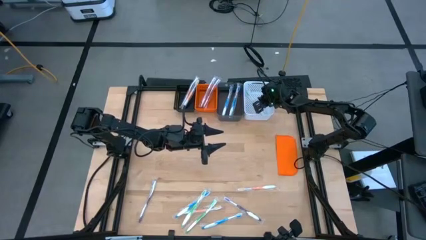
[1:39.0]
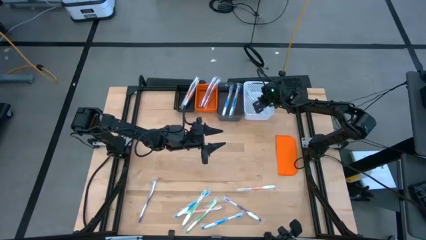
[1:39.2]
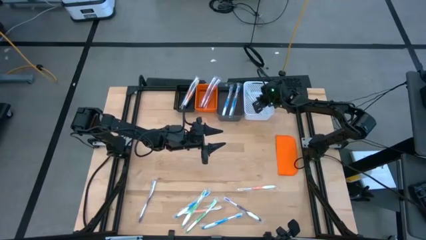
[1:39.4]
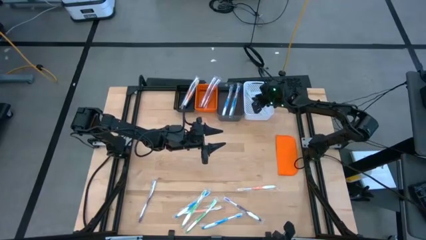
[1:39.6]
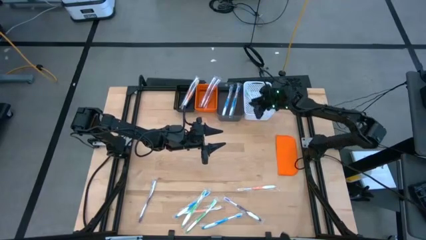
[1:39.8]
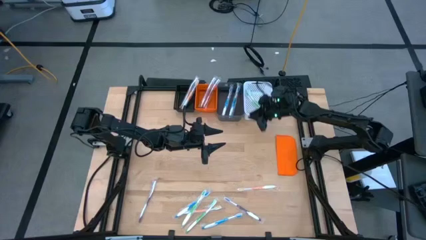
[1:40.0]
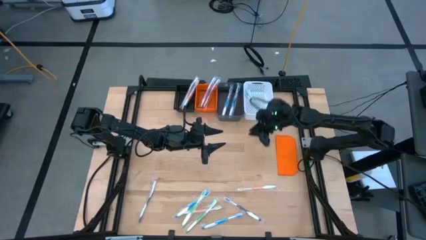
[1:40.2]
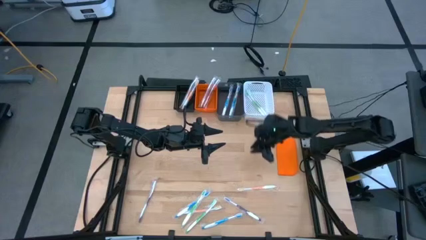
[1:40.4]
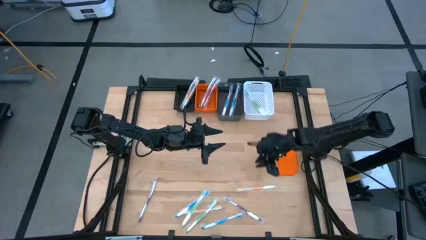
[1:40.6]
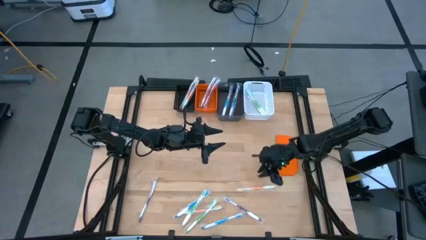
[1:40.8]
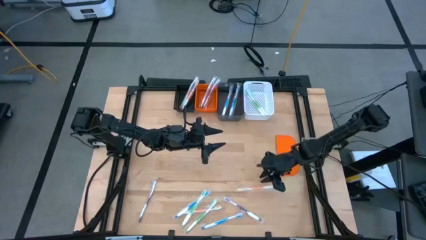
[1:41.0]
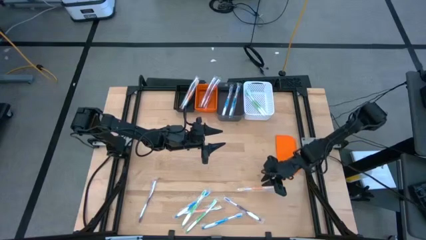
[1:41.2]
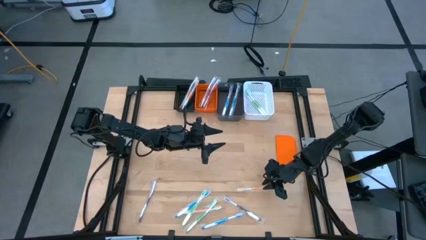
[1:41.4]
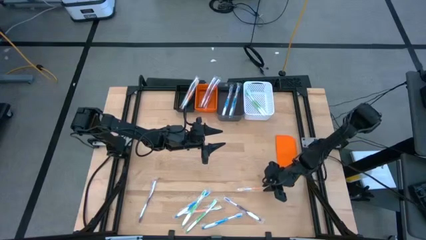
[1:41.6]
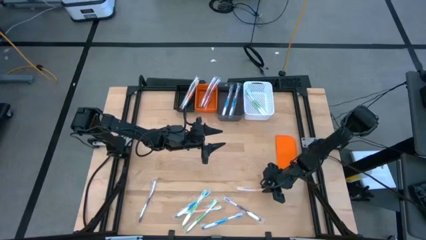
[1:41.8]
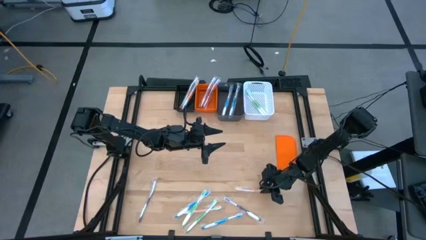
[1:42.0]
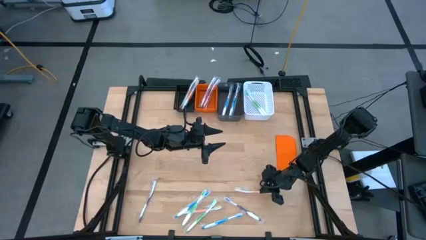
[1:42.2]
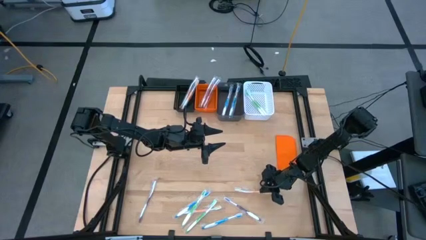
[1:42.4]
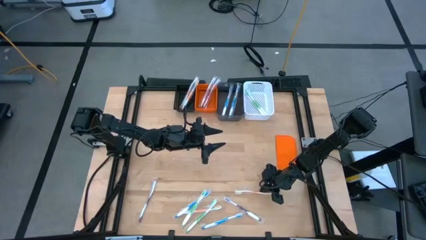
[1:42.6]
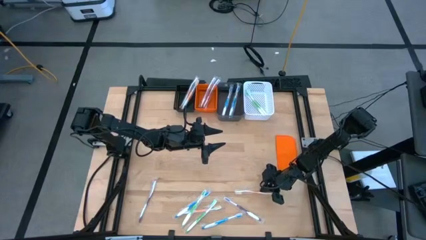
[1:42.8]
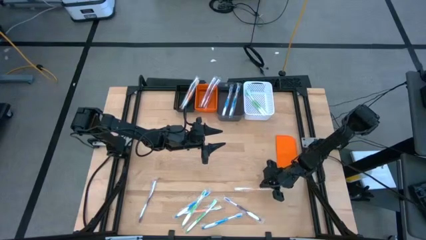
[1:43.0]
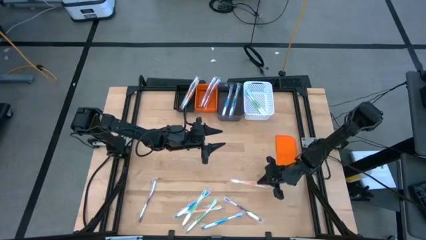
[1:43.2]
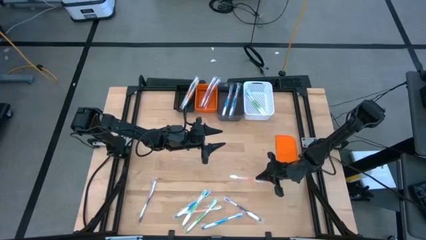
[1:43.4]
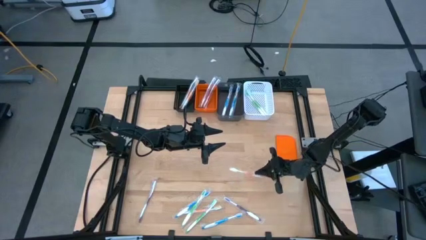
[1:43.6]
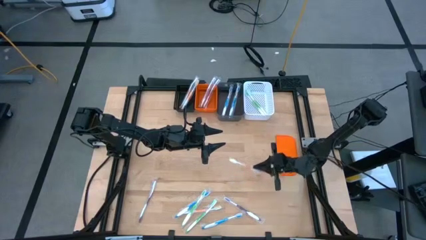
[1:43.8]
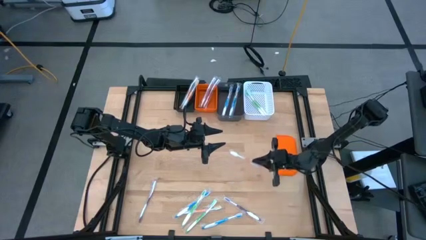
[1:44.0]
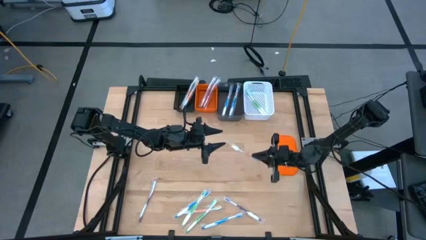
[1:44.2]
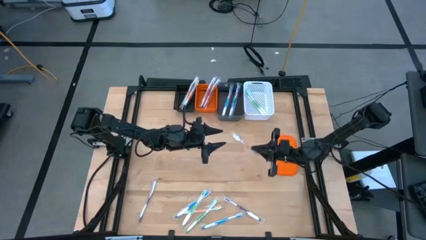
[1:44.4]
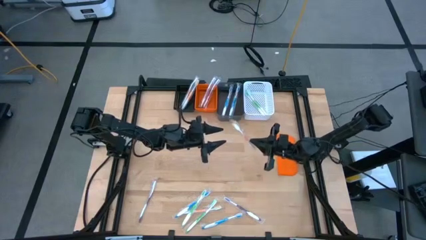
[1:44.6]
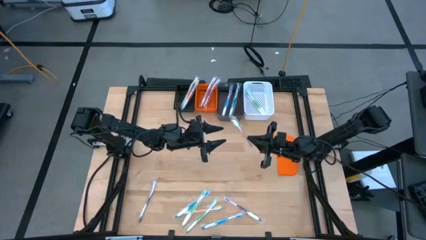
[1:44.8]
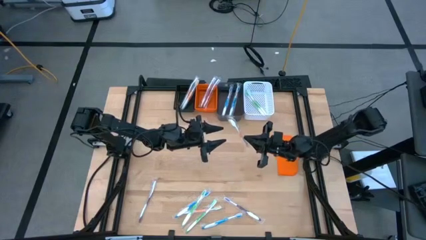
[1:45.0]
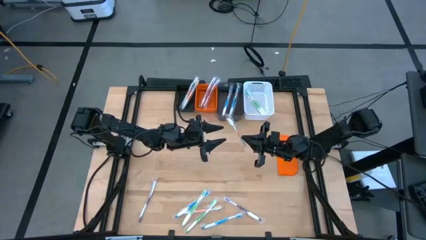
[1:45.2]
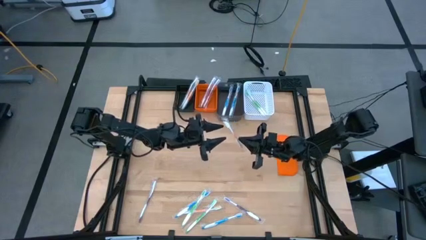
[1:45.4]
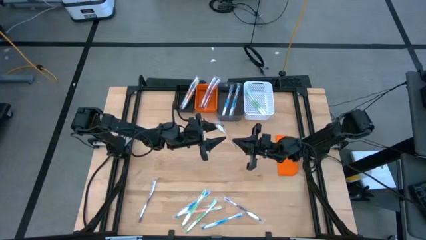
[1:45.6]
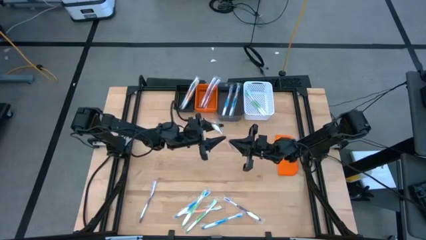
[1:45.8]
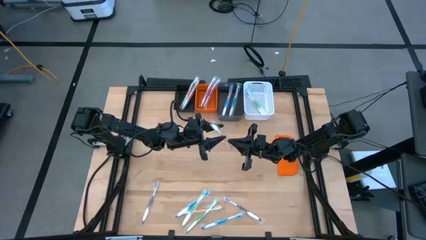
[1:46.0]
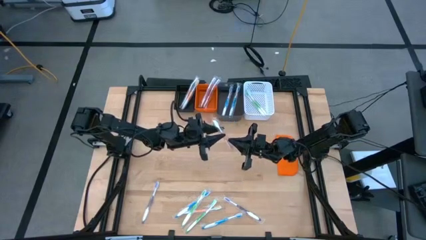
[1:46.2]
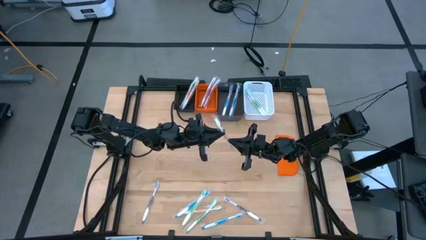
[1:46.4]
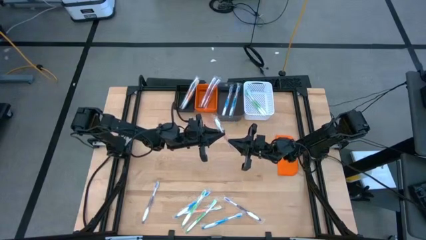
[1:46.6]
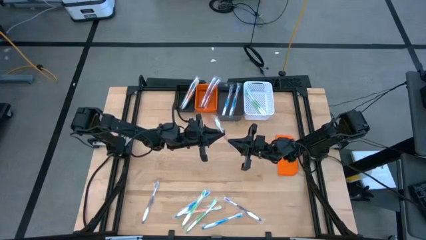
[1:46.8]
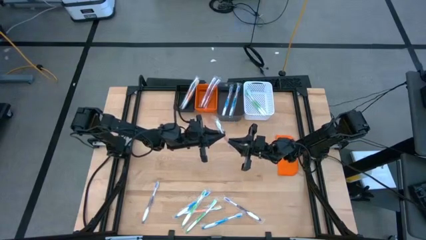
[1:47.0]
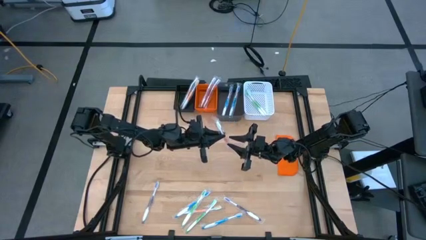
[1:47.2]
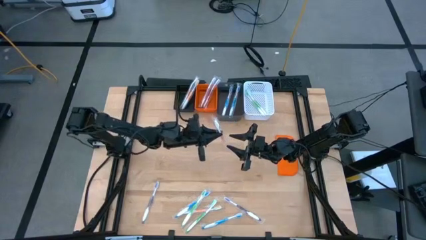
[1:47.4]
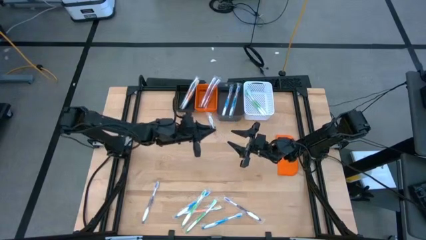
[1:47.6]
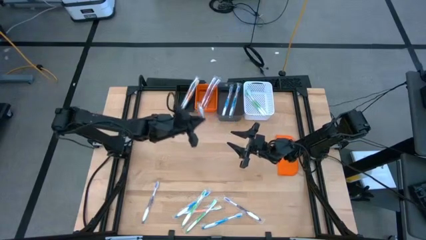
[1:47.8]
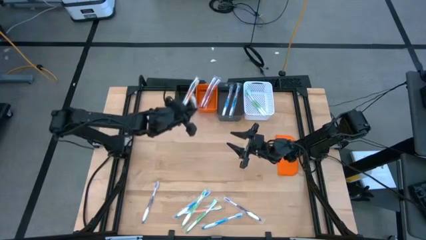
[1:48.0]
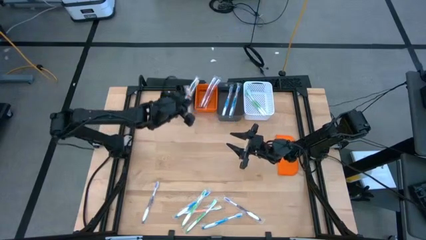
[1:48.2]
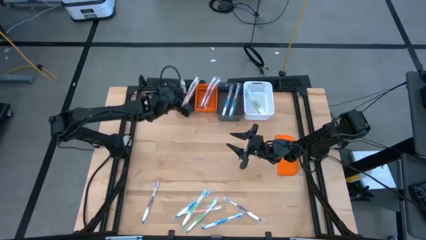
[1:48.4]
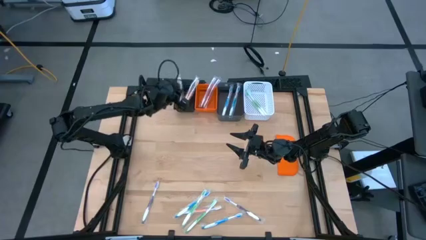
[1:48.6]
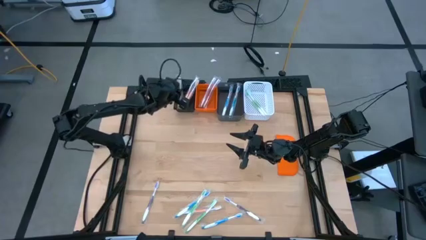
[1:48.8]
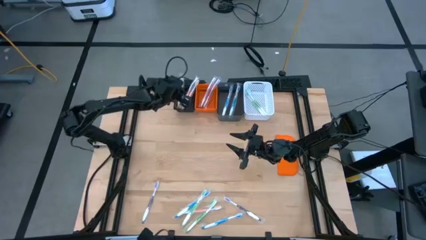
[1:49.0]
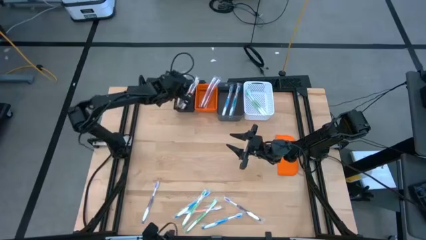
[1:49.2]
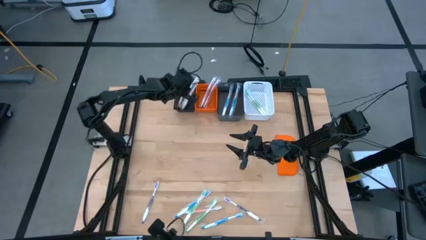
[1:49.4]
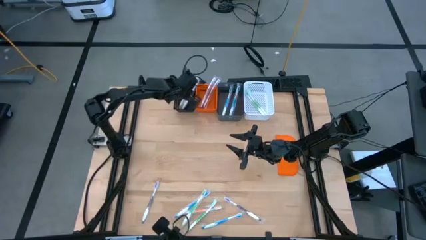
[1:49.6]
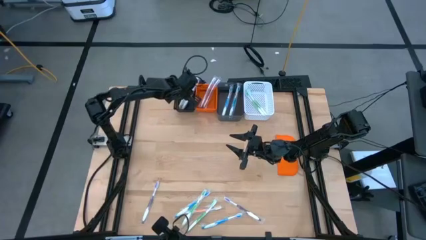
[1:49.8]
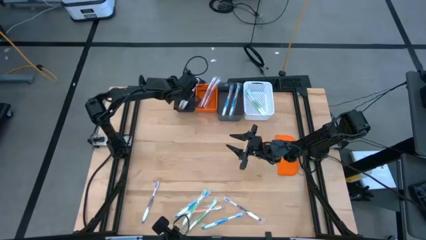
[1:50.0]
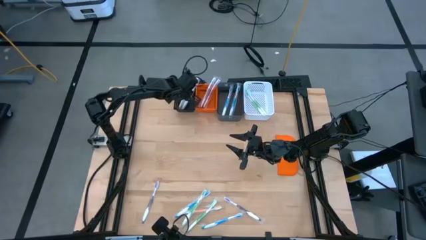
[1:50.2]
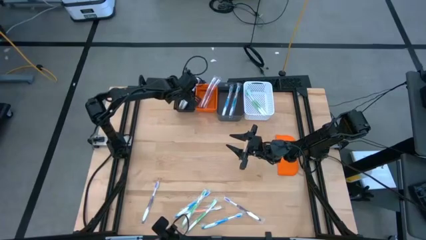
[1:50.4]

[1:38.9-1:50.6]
Task: Pick & Place Toothbrushes
Put the orange toothbrush into the black bin

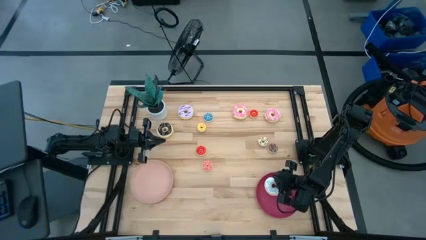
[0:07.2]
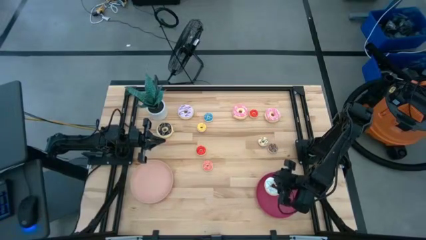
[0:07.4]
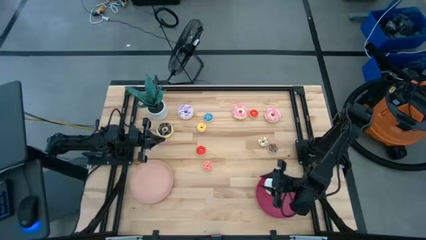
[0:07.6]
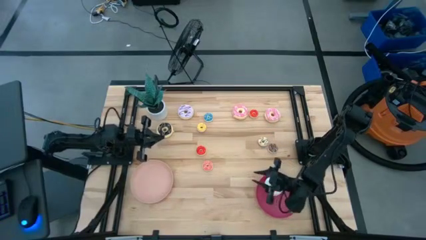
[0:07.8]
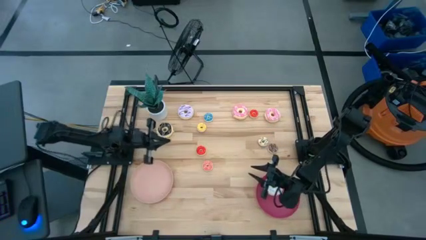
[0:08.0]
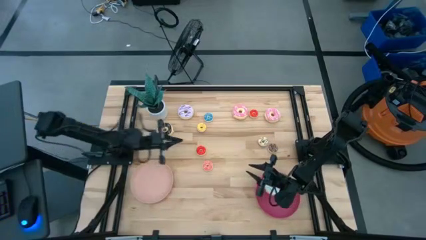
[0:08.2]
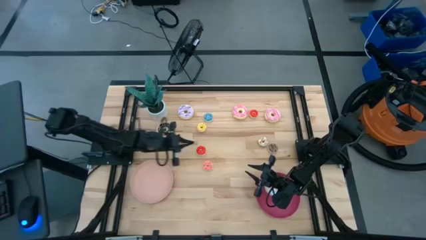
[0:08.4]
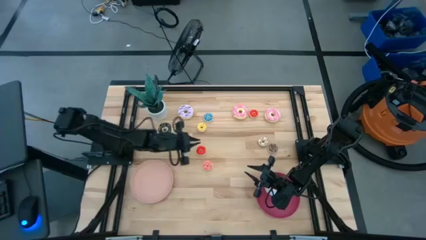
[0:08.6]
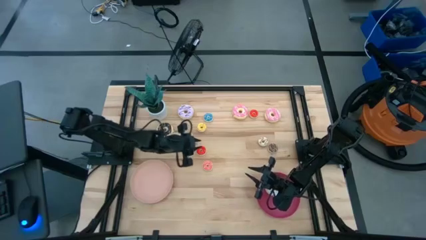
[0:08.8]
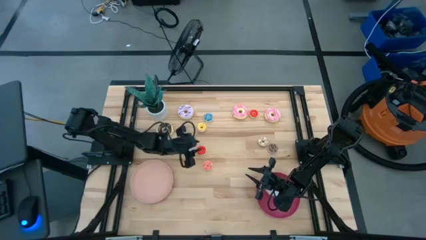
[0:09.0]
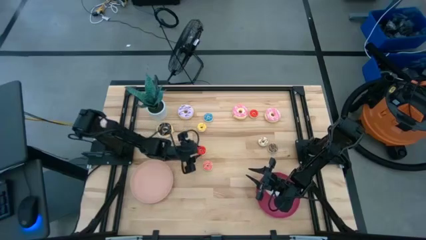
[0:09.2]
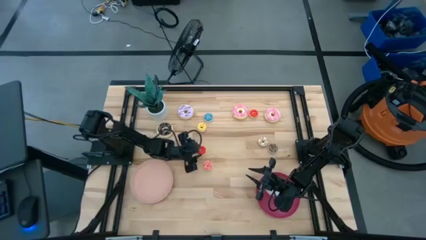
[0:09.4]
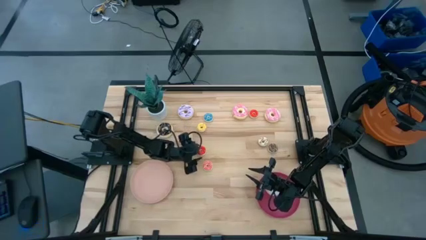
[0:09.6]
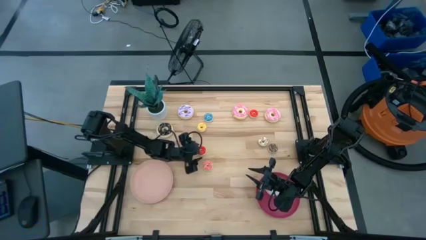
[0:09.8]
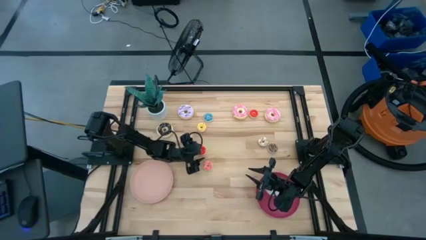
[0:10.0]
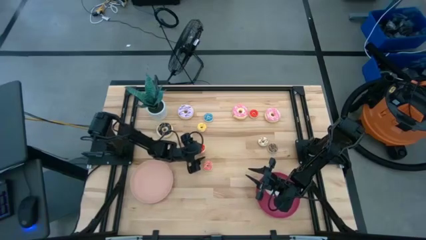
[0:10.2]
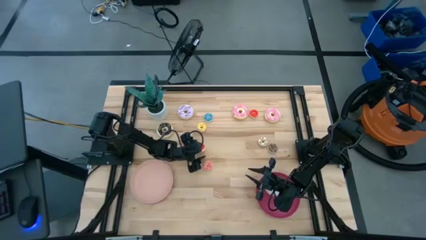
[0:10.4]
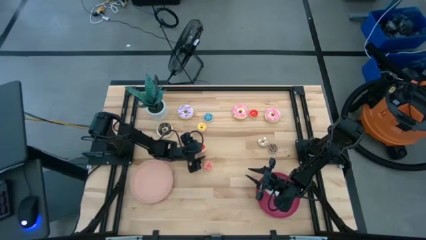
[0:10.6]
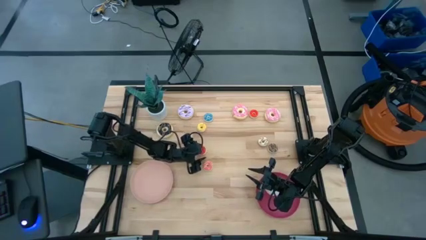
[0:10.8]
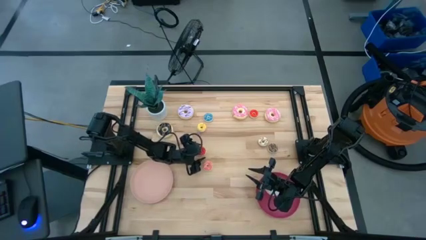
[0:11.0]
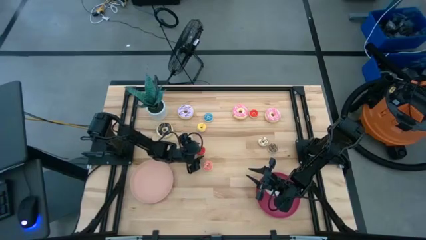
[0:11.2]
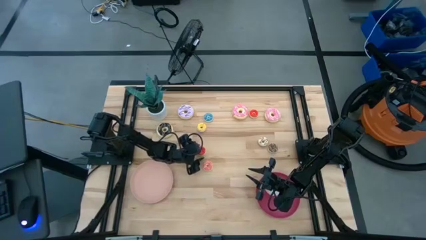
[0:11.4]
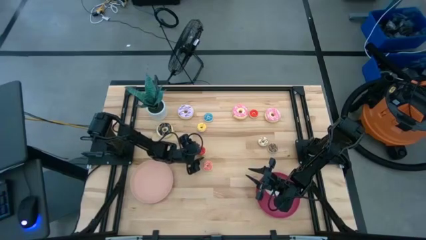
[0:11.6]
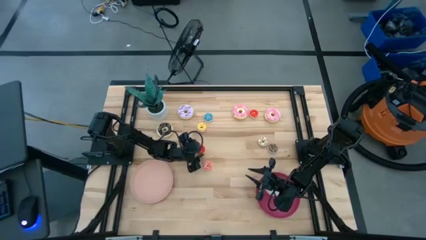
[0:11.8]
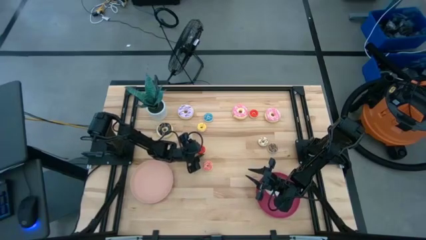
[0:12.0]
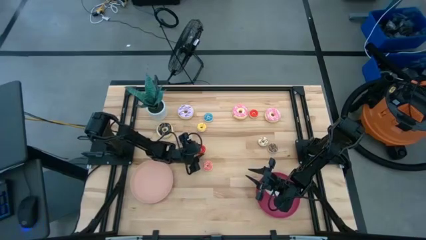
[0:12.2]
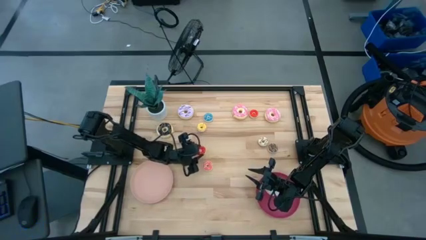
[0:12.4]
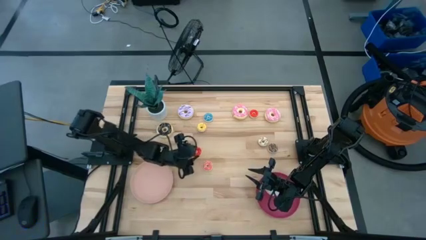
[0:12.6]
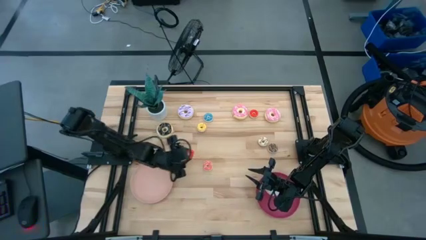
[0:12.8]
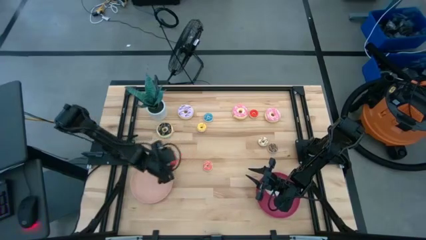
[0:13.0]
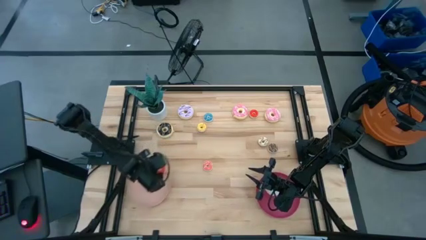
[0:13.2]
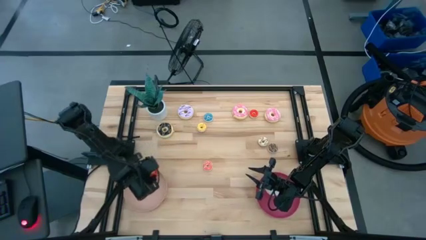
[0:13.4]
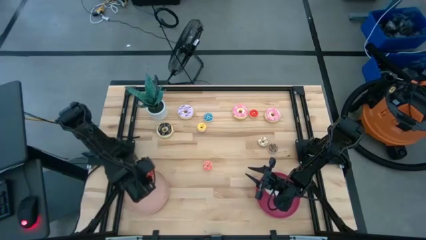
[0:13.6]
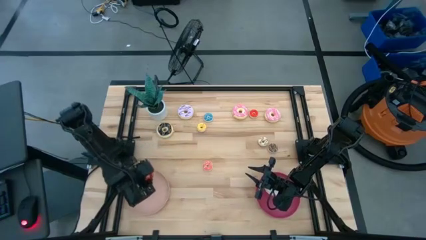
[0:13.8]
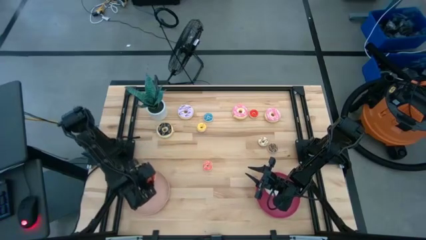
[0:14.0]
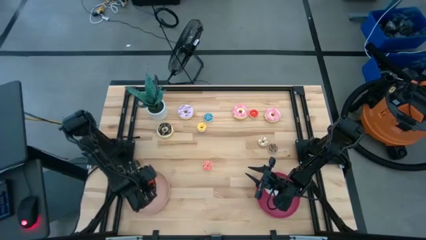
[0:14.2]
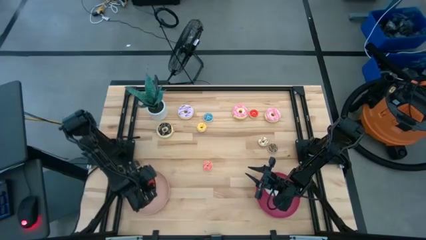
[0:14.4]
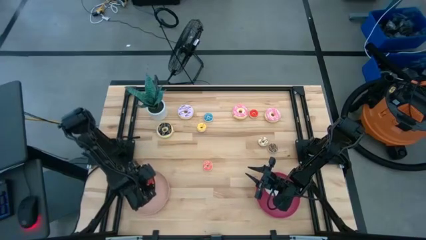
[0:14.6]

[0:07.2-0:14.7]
Task: Pick & Place donuts
Put the bottom small red donut on the light pink plate
